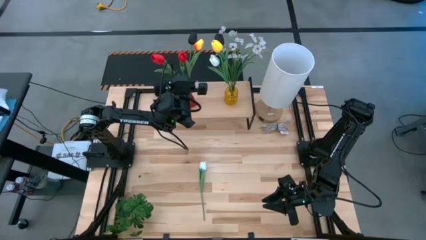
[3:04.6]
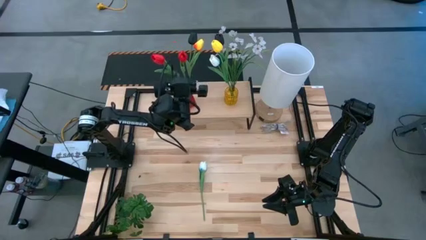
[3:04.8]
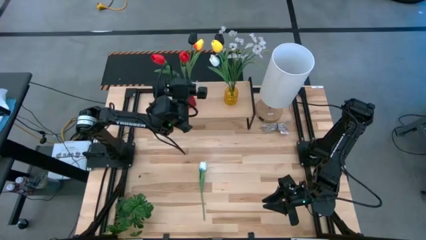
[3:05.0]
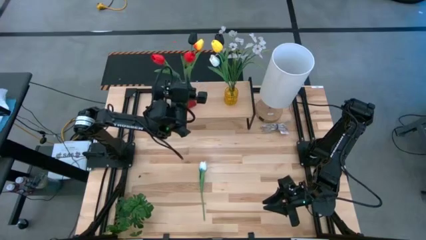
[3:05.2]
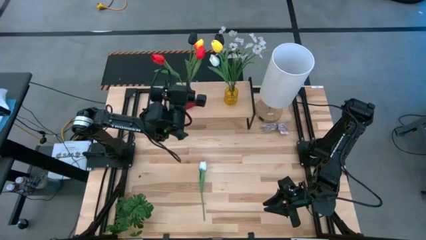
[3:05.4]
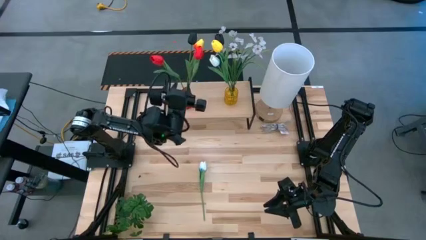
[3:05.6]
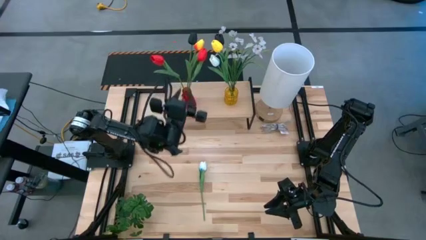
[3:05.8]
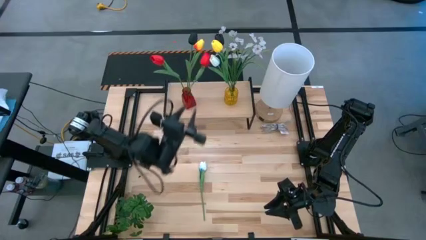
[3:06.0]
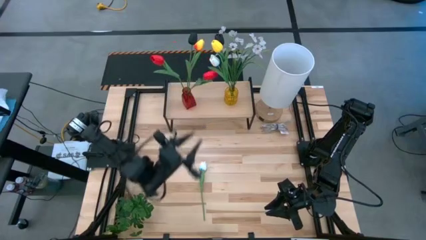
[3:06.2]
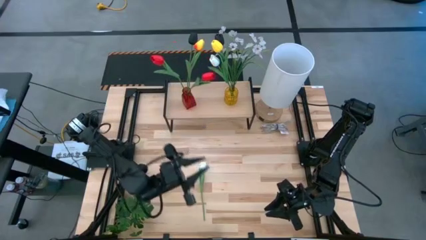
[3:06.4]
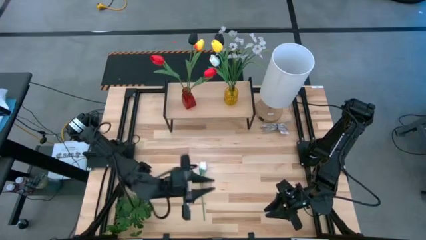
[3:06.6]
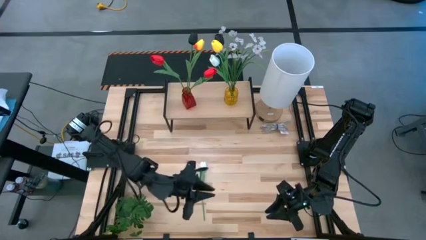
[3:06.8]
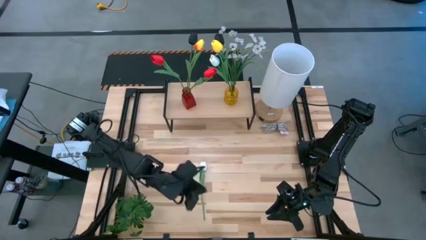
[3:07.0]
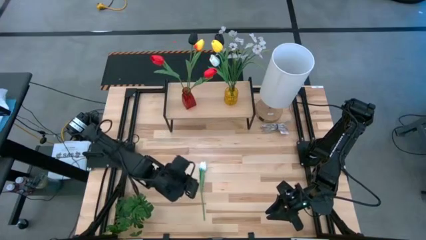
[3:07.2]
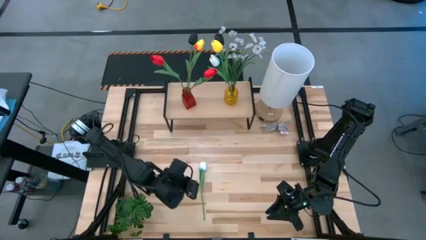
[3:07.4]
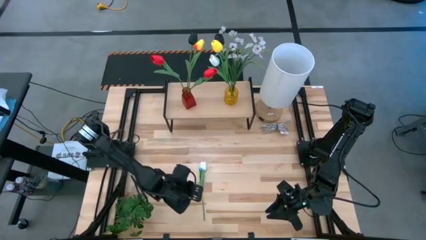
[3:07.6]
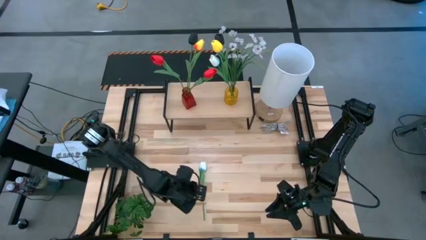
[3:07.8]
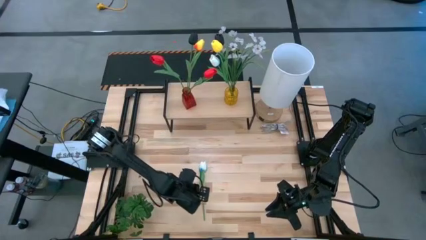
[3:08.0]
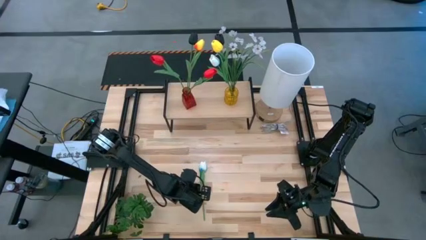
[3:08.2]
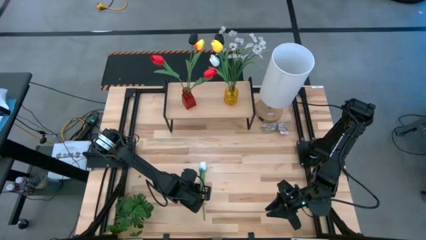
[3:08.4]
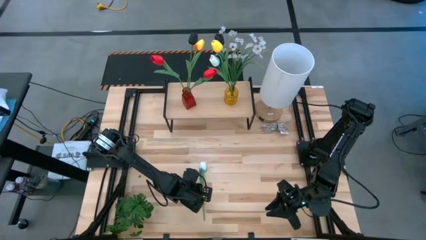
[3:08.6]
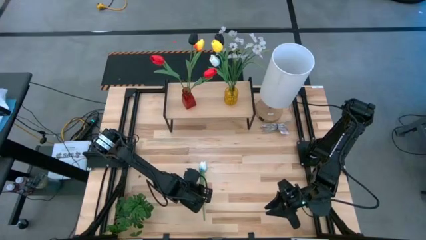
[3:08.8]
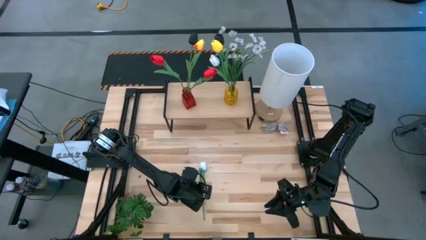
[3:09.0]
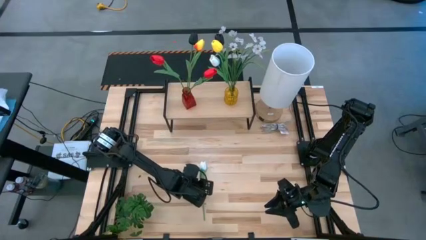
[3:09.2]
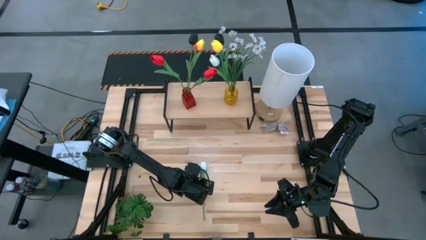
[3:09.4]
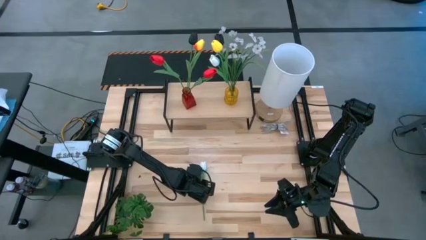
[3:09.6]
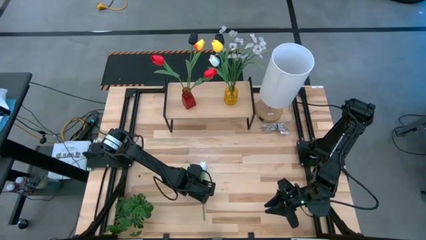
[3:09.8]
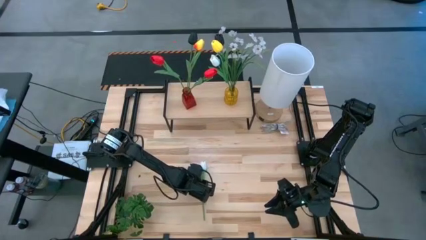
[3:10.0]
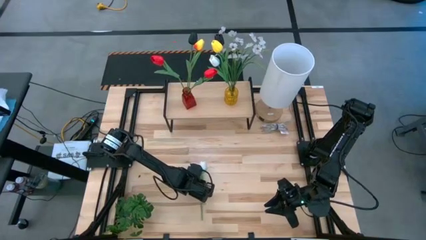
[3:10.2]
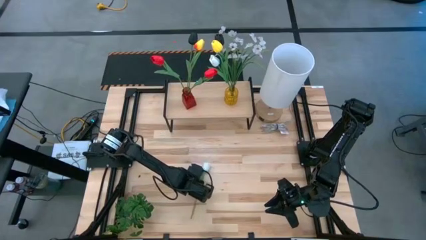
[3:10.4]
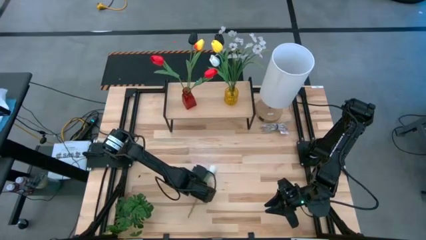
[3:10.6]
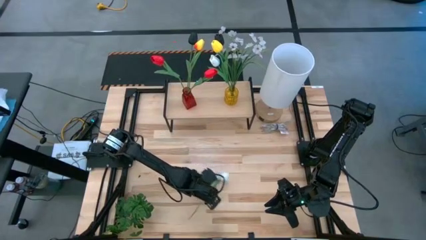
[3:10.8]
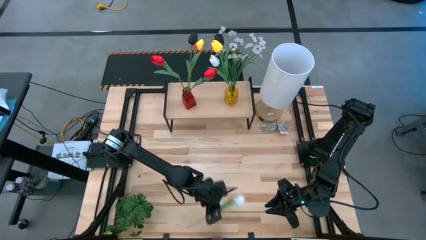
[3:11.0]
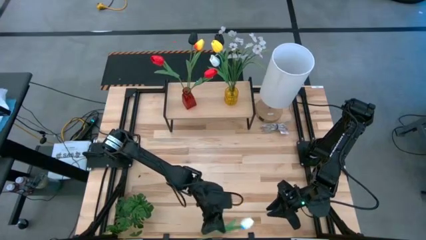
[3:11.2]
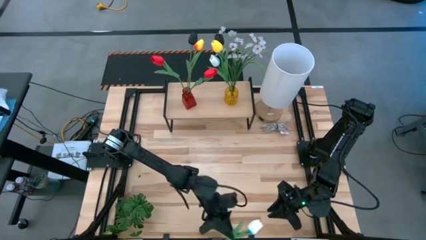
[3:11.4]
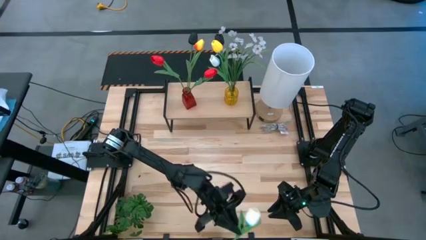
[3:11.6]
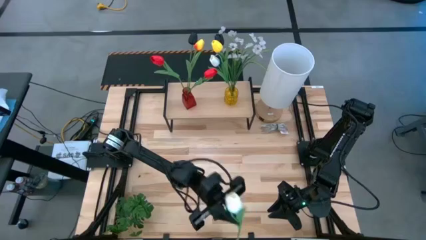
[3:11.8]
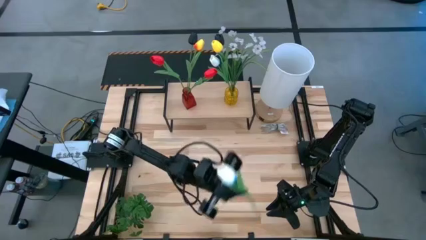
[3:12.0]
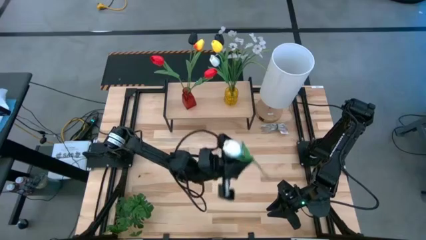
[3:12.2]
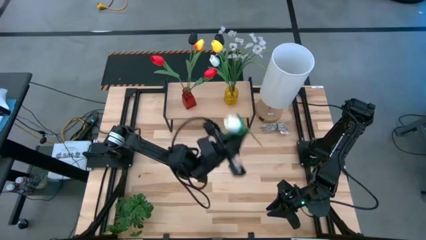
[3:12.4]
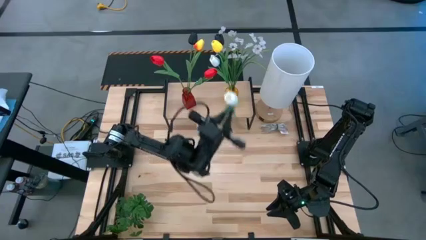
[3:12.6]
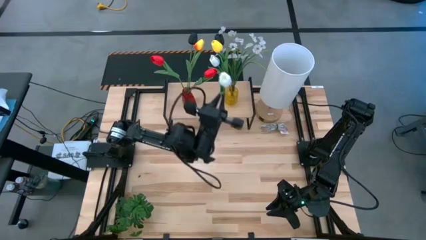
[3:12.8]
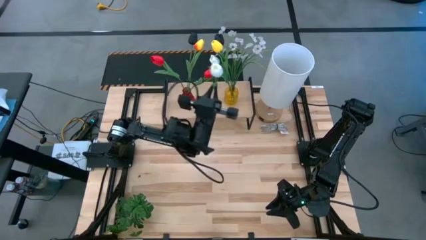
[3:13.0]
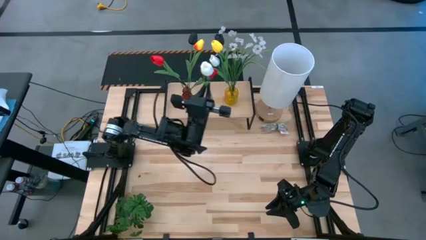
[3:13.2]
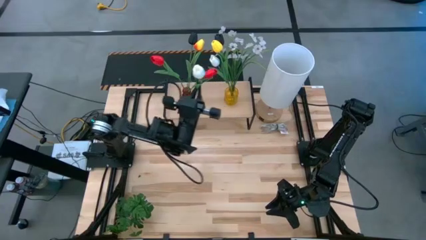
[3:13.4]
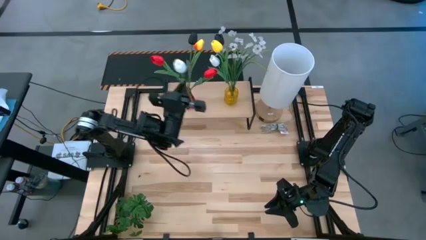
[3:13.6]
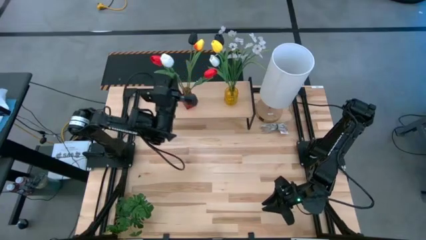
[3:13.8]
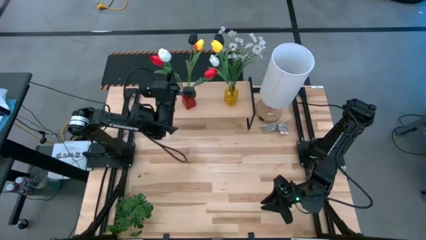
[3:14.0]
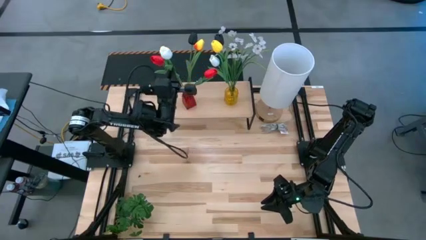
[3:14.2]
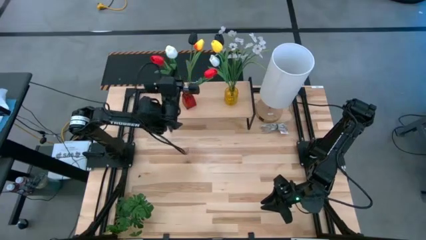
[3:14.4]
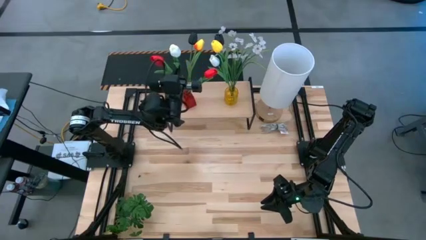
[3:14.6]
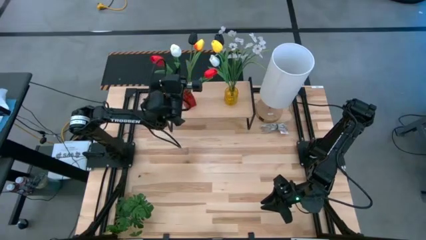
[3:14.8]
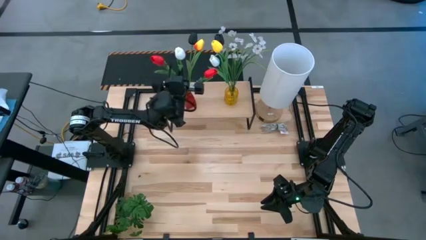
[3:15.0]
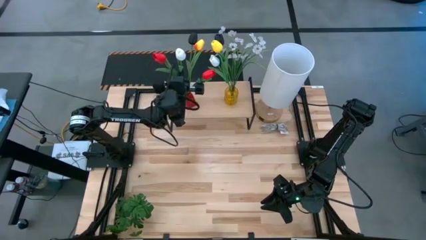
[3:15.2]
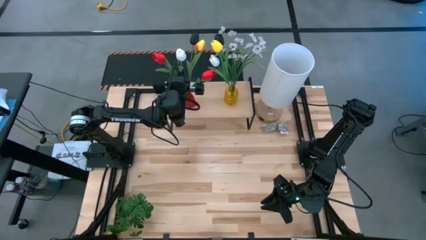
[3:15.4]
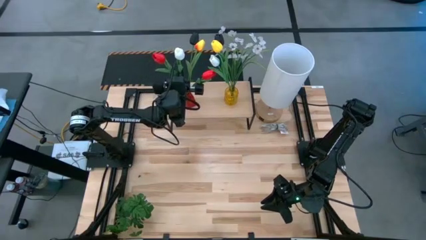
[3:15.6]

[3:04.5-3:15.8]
Task: Pick and place flowers into a vace then onto a shelf
Put the white tulip into the red flower vase

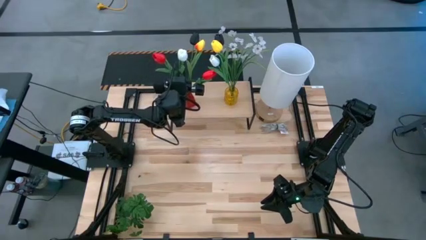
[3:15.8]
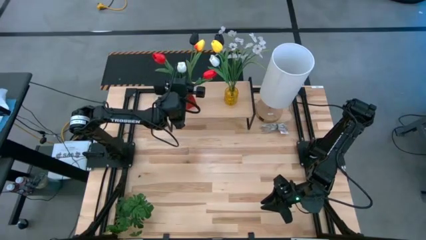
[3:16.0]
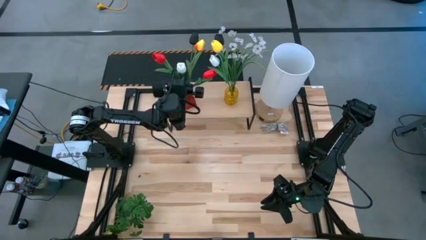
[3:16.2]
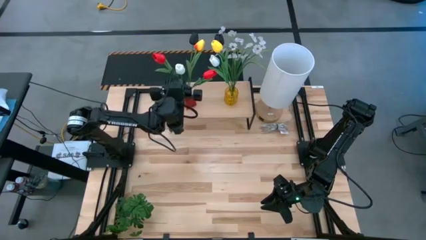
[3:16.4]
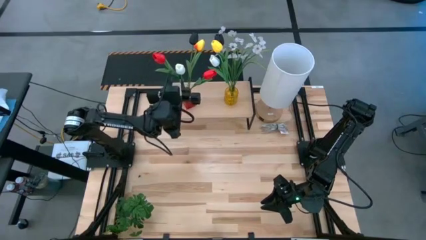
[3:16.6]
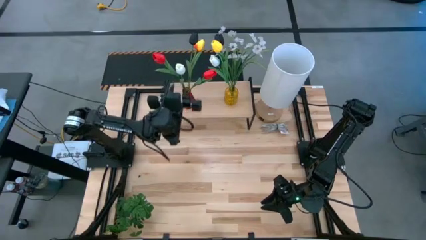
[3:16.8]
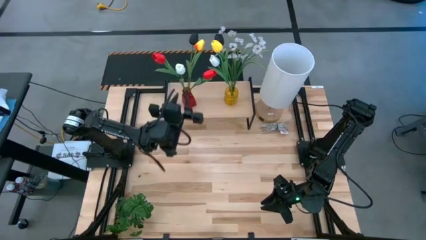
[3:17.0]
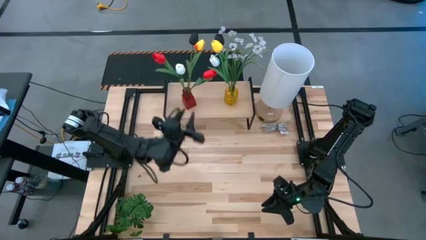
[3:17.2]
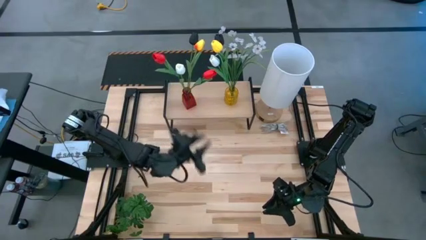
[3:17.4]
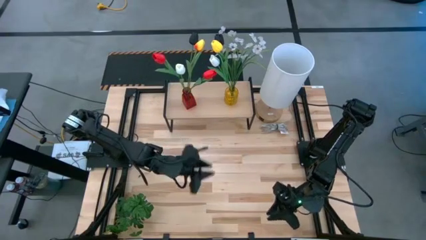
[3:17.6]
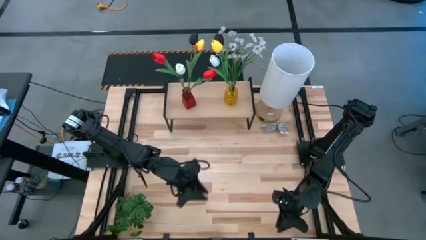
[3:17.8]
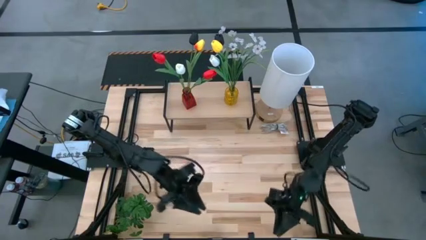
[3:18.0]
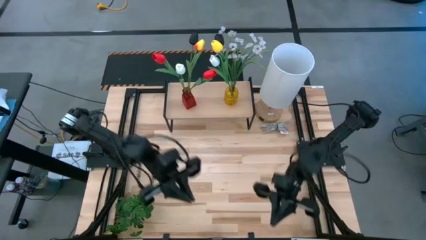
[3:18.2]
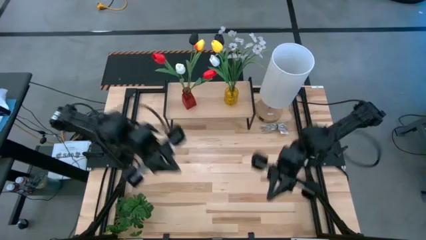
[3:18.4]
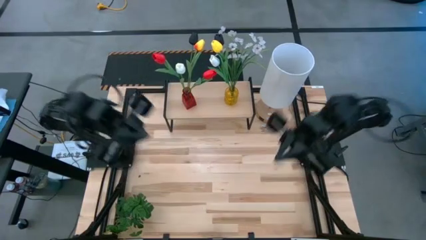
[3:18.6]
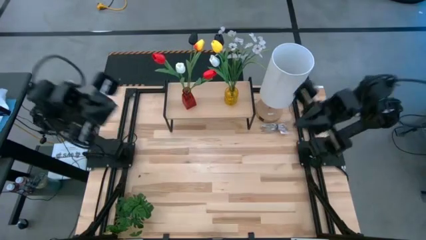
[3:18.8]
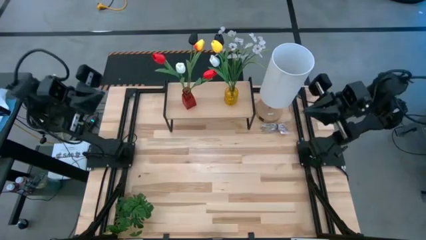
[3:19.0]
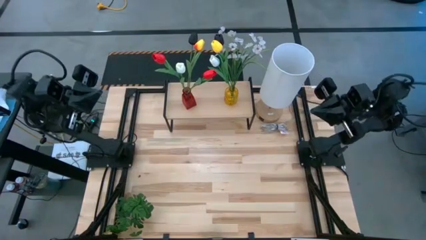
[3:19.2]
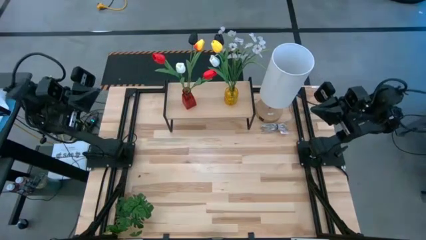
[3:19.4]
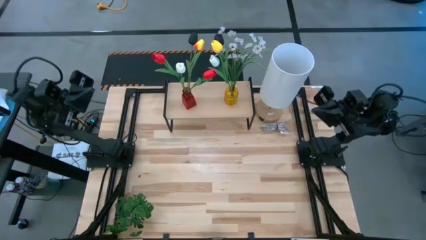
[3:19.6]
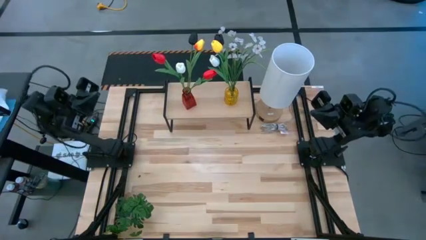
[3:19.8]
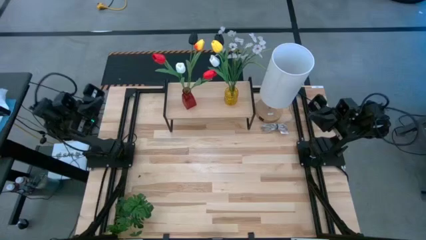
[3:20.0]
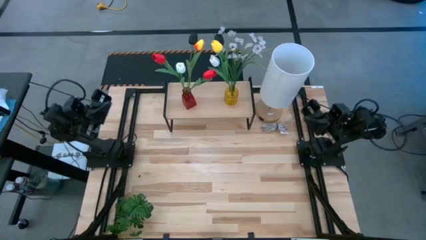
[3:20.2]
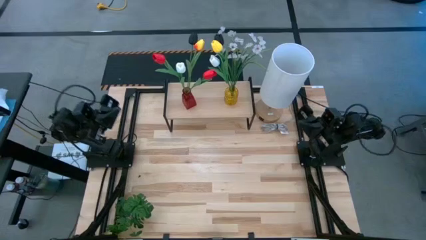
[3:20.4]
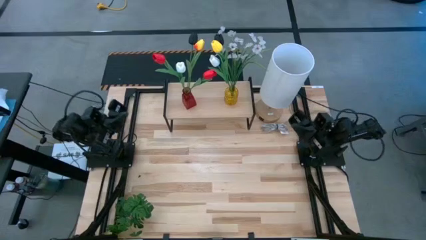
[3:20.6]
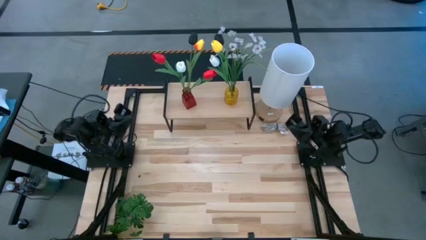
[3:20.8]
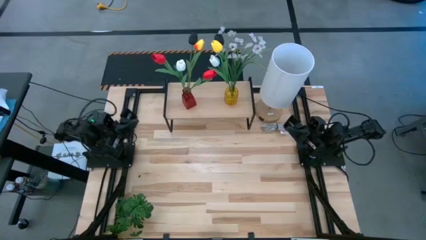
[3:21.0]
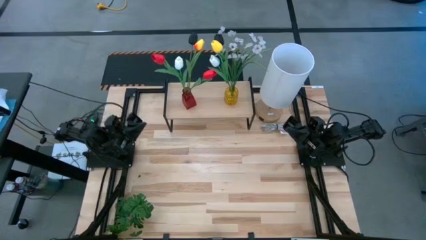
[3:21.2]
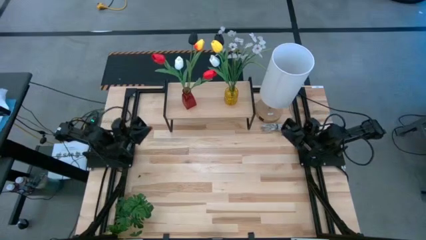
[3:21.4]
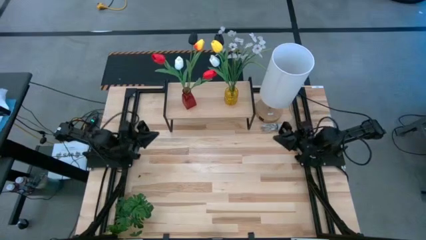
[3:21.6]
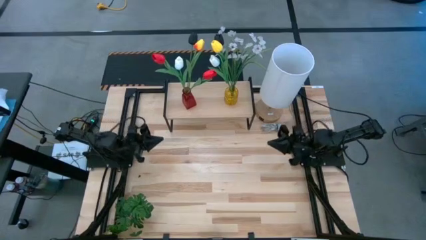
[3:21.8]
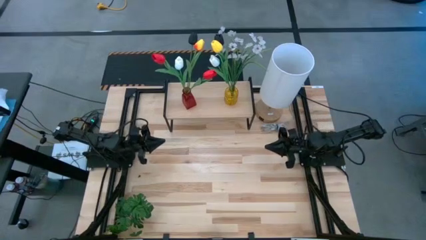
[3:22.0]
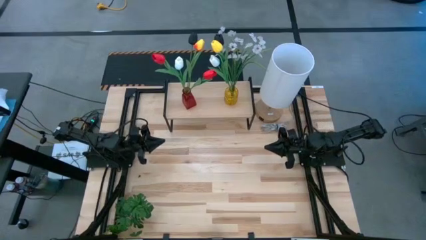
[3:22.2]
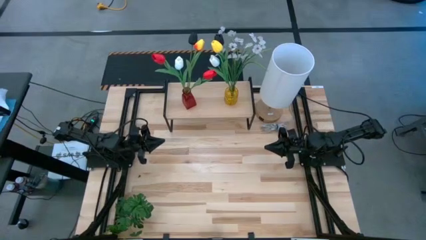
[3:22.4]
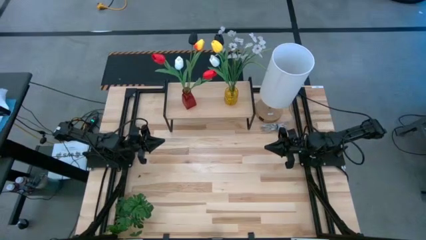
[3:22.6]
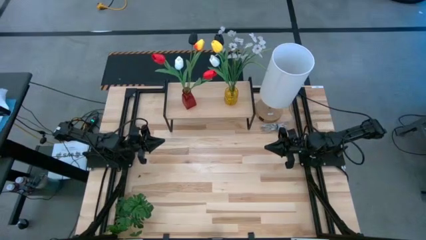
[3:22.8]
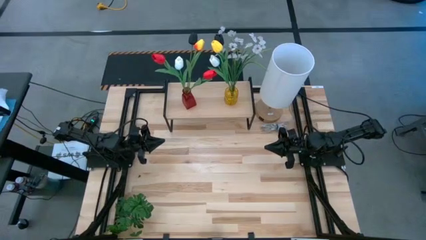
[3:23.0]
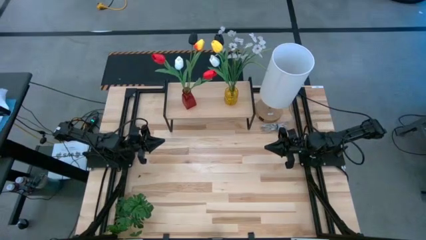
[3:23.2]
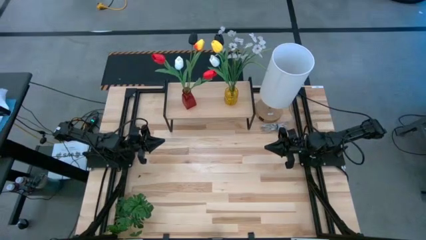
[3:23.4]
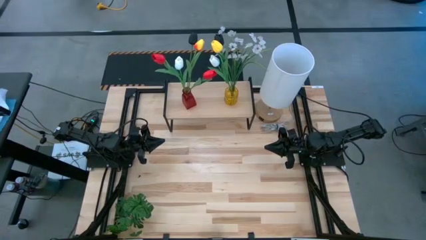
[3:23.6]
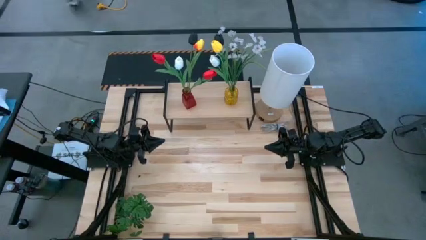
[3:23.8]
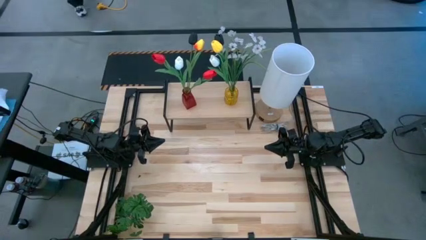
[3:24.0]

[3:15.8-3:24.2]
Return to Home Position
